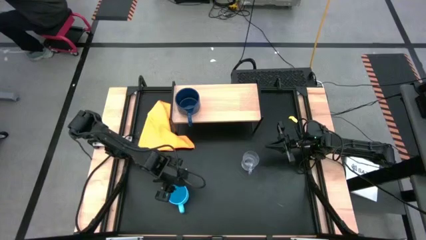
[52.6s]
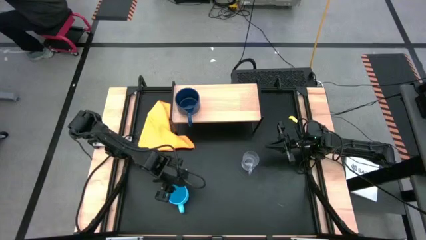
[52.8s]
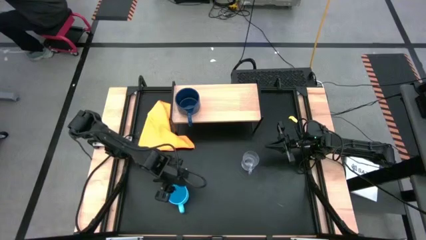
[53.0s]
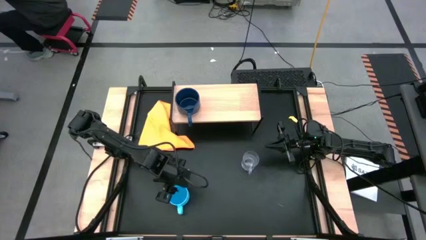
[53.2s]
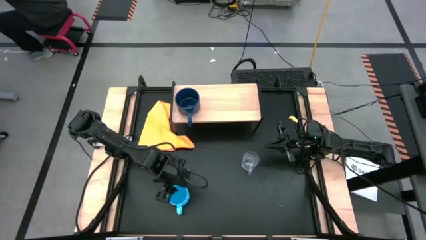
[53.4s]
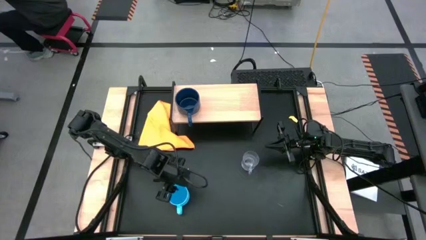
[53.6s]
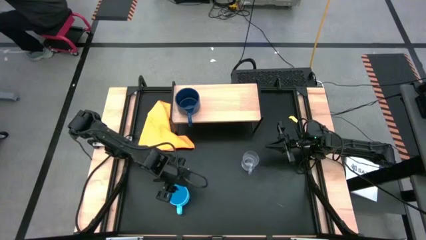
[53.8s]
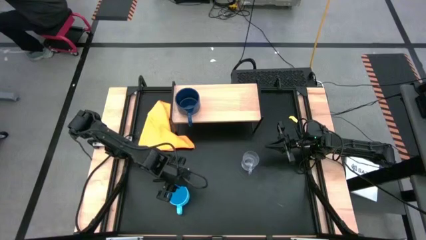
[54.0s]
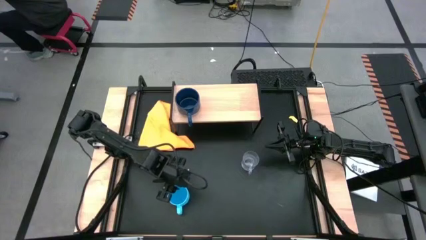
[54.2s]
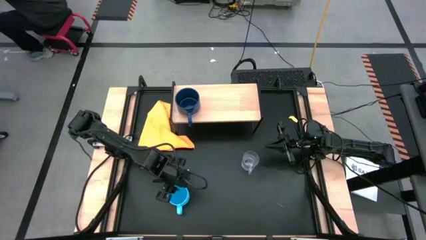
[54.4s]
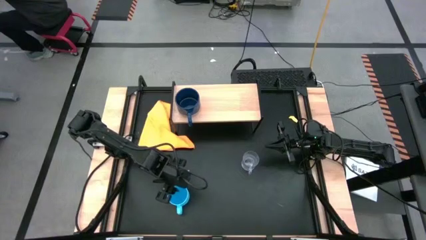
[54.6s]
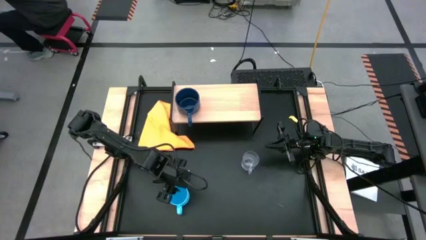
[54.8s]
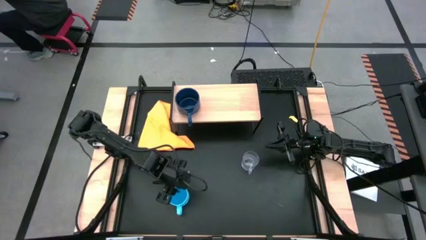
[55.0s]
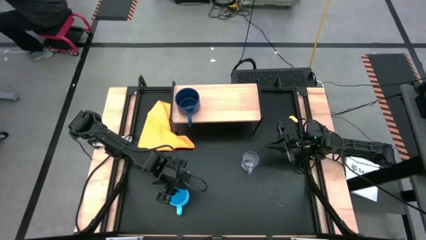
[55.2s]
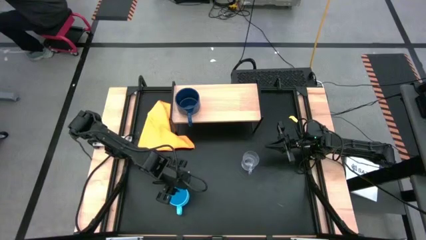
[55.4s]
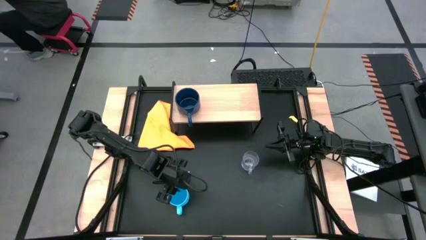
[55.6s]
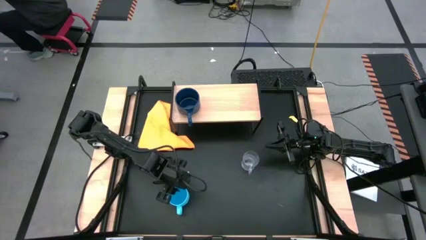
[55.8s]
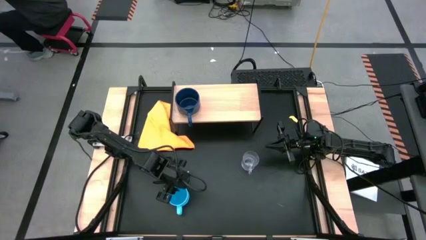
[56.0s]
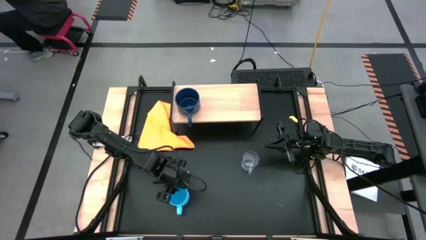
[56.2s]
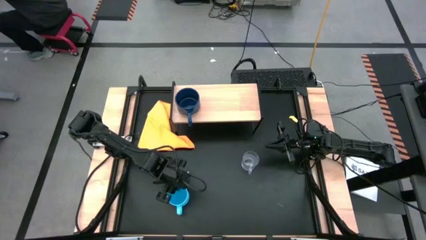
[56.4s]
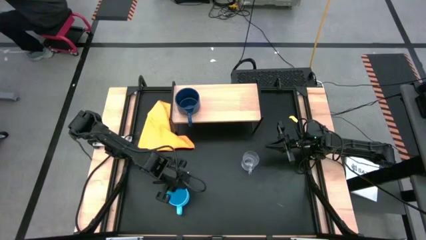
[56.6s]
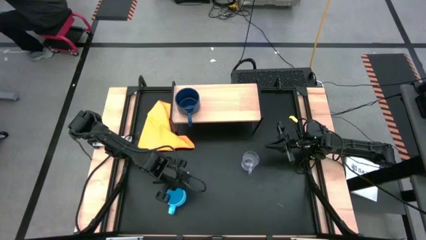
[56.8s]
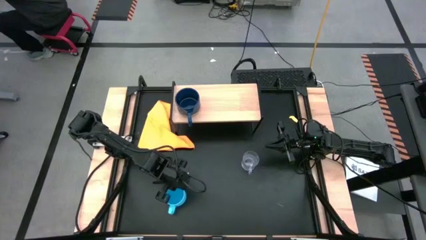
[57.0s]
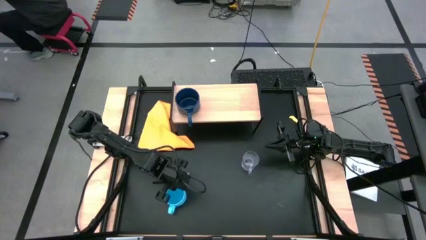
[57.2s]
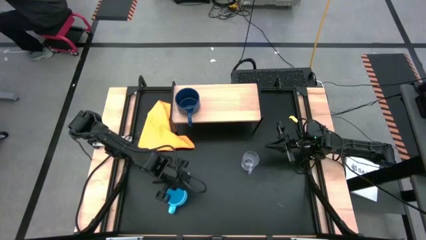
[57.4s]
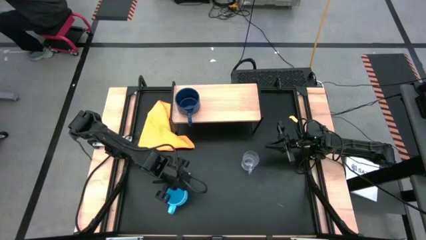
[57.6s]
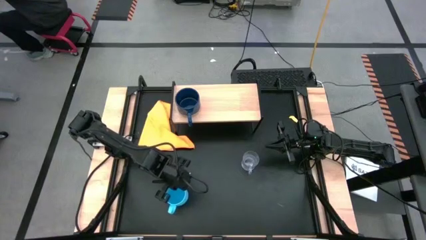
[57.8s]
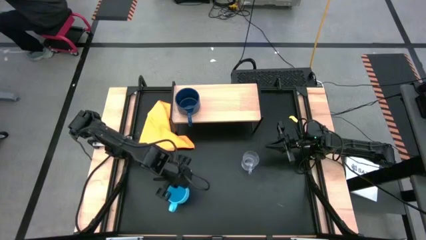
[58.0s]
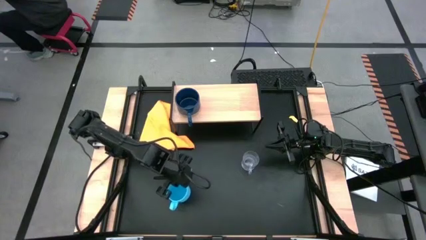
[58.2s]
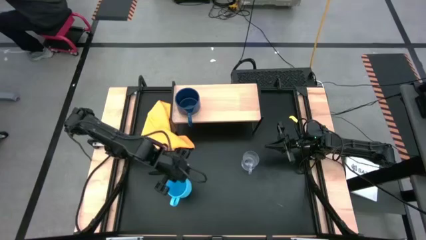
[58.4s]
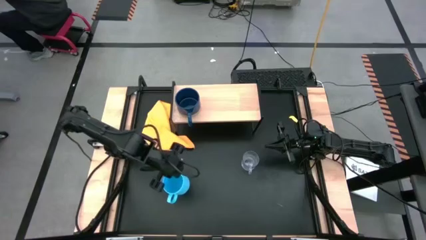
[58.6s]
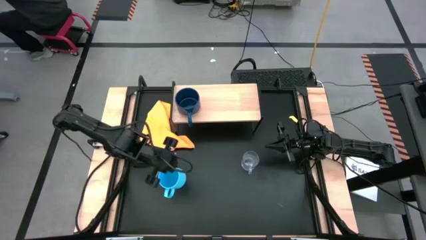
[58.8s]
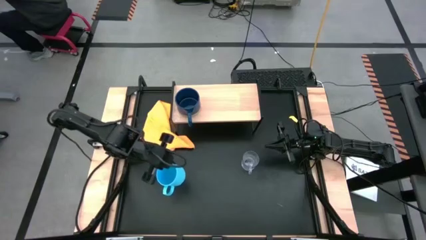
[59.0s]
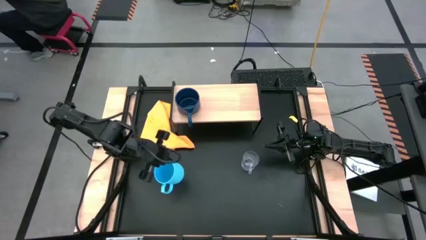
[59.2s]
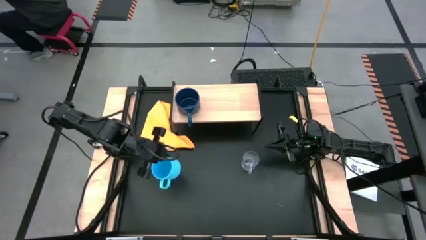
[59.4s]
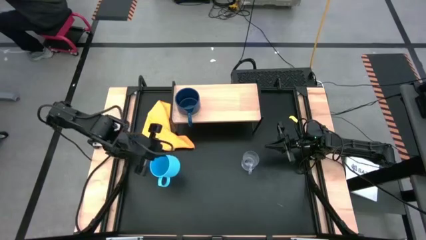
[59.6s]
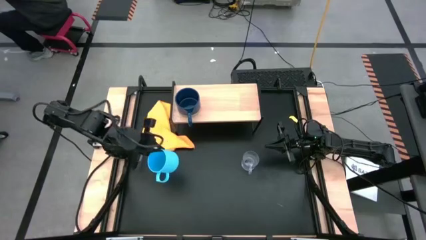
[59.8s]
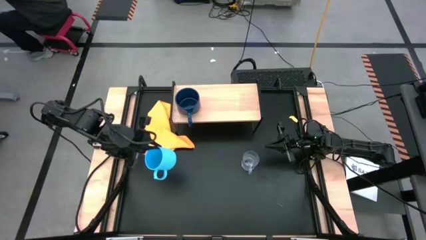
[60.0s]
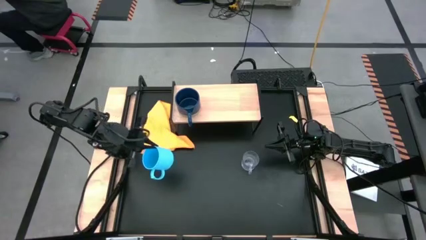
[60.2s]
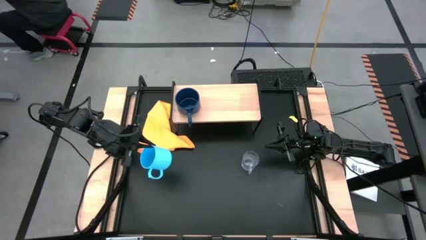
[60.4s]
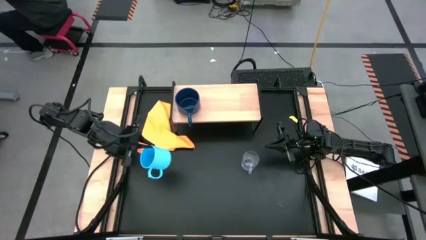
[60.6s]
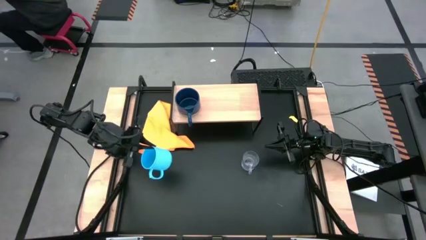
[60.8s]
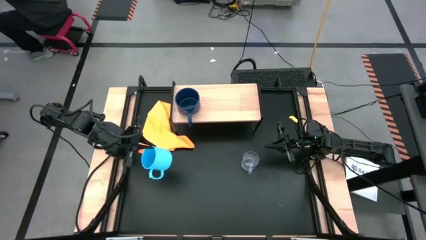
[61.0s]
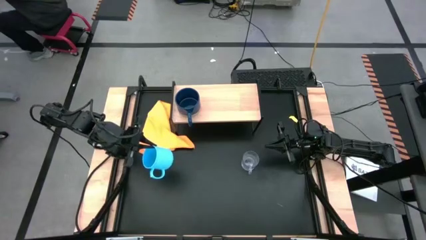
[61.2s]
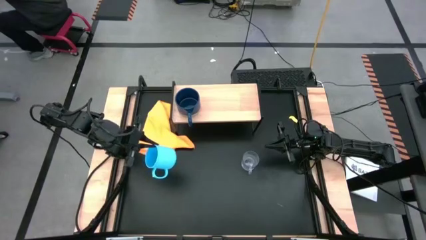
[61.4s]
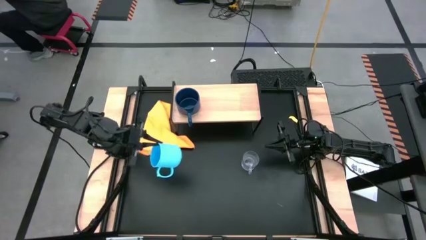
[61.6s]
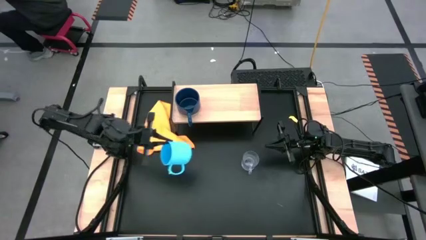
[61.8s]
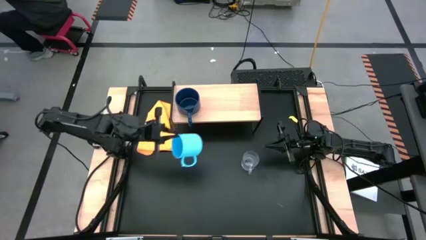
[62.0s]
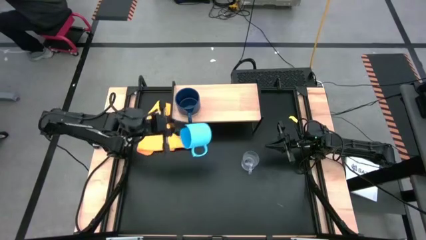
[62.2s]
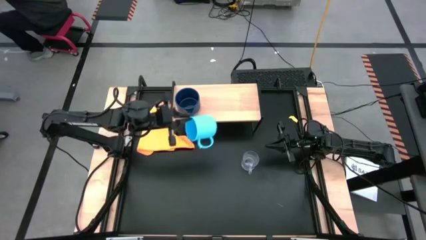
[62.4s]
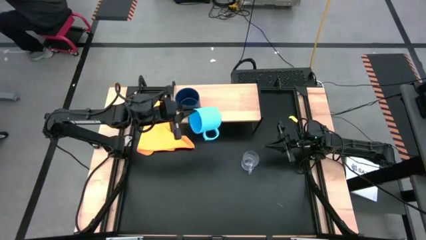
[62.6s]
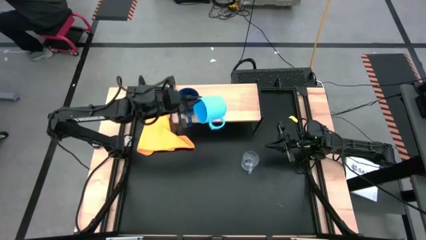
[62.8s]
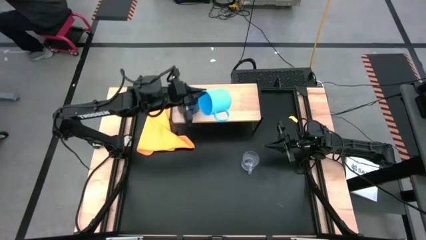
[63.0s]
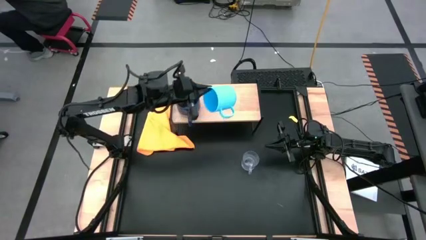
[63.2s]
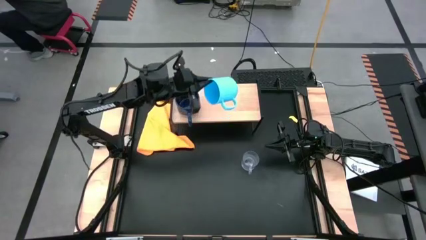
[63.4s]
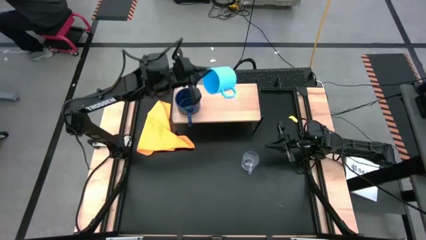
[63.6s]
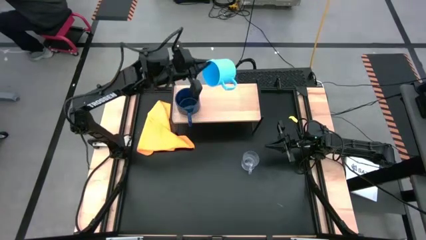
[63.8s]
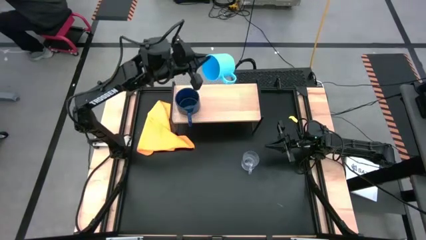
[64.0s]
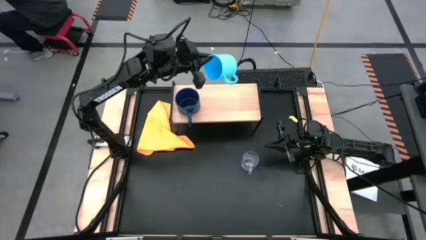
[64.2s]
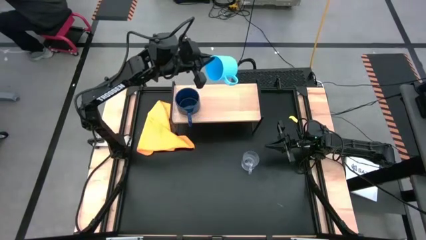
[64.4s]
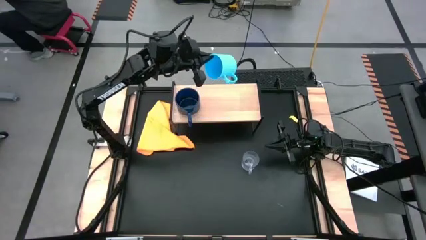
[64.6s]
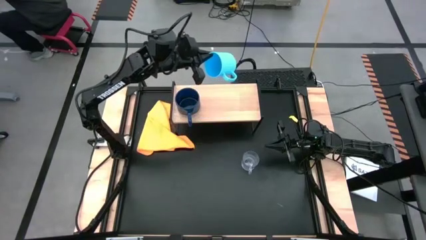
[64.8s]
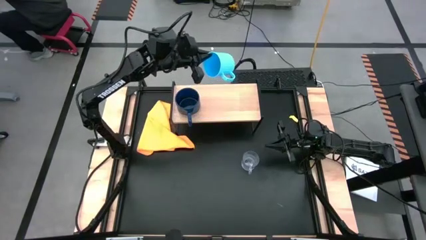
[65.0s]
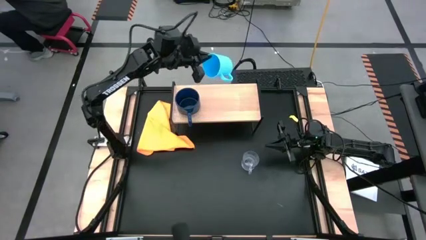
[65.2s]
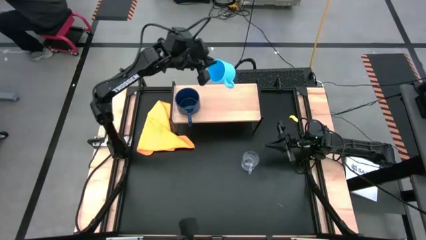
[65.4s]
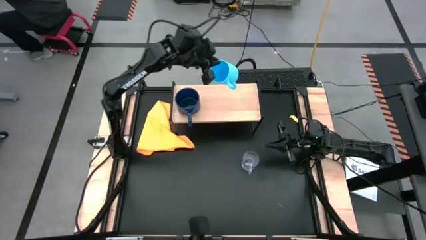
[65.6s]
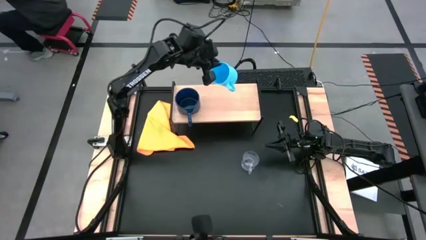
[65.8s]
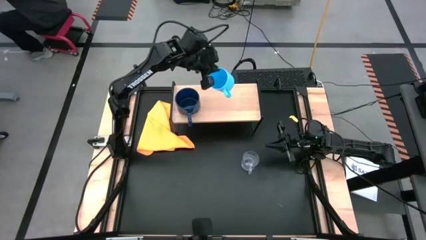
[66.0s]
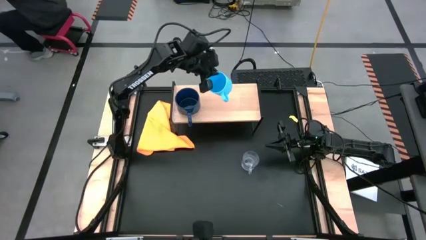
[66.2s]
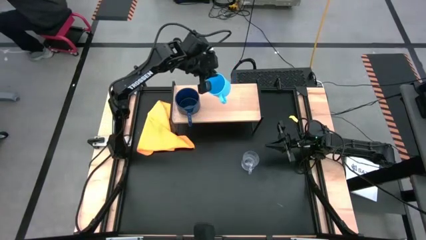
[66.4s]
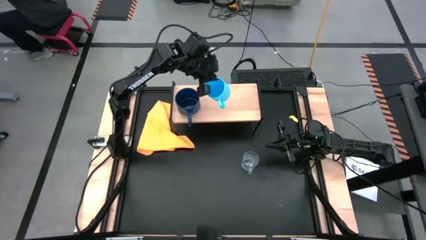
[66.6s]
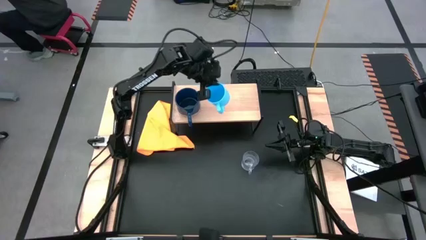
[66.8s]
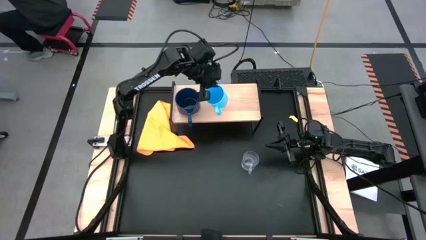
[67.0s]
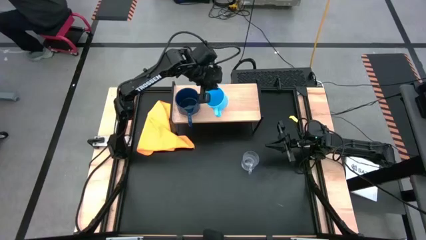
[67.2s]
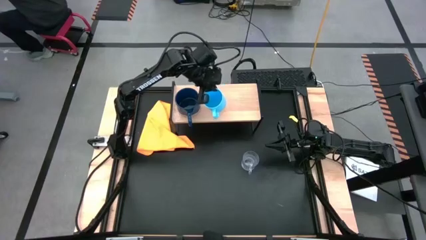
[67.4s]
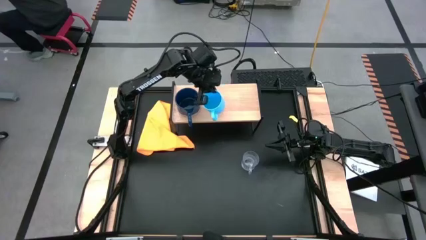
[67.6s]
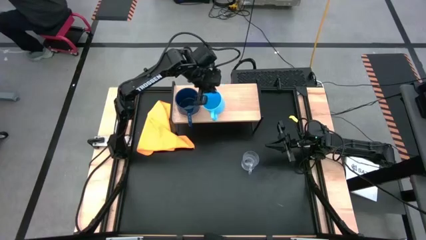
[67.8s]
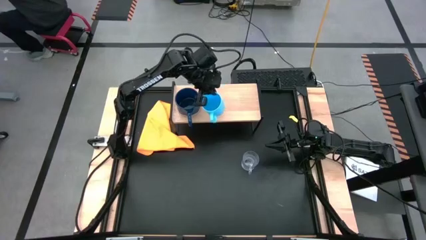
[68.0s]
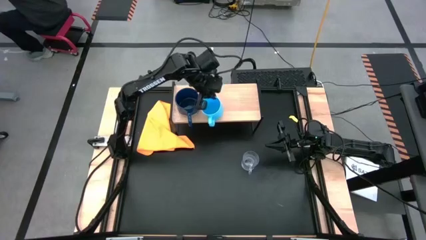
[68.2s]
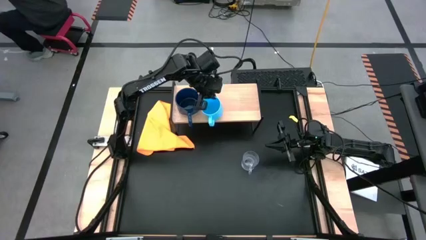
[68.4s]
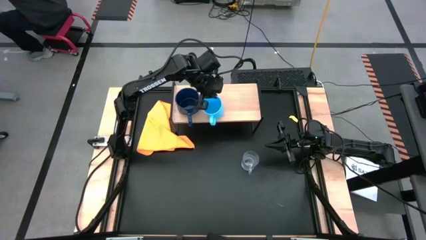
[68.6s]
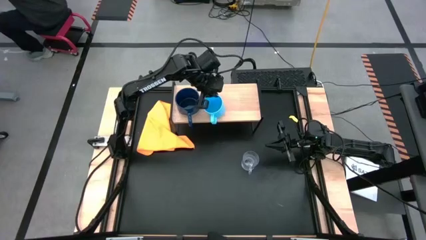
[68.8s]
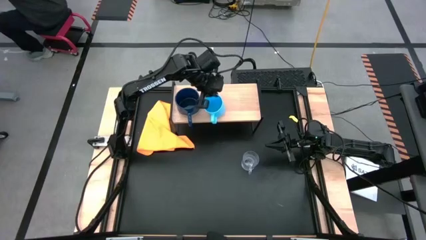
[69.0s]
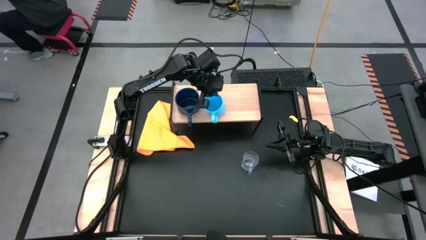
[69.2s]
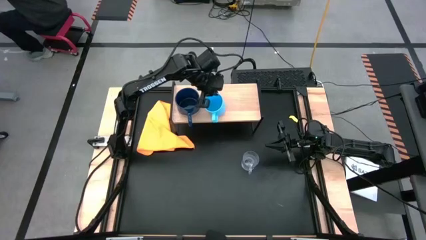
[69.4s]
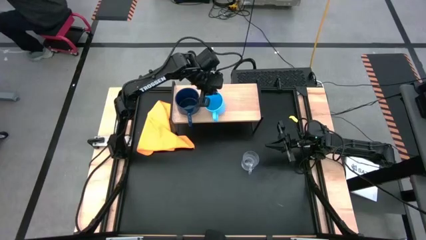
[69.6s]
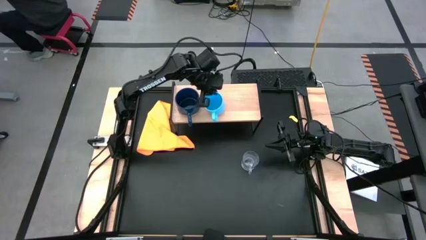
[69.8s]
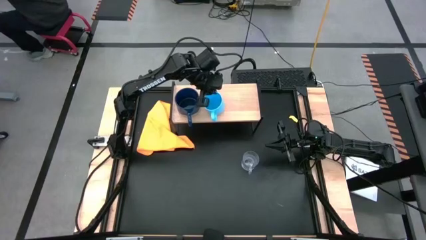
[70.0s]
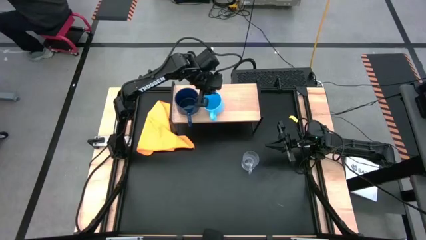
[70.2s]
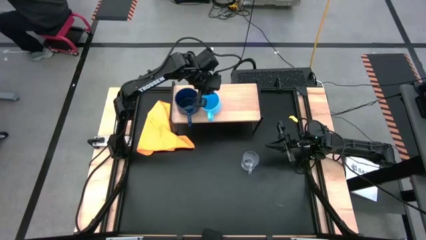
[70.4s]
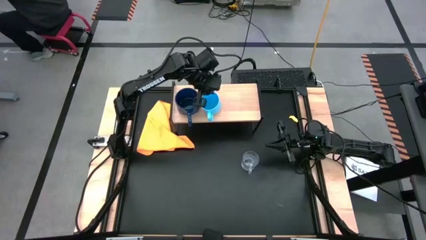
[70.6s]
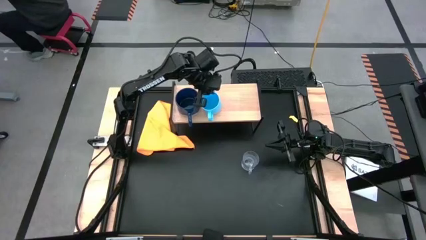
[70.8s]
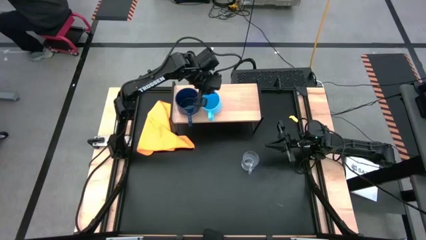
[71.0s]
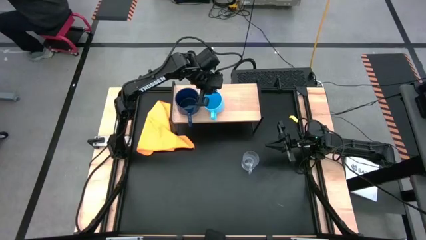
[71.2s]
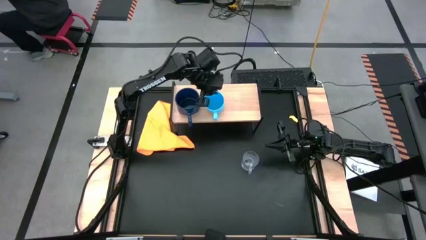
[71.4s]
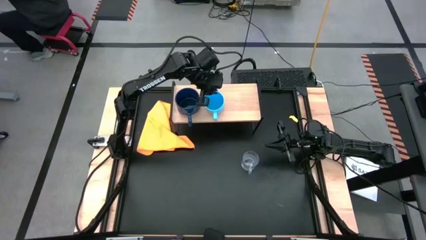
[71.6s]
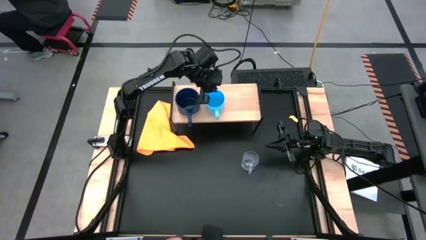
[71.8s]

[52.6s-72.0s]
Task: Stack small to large cups/mugs on shelf
Put the blue mug on the shelf
